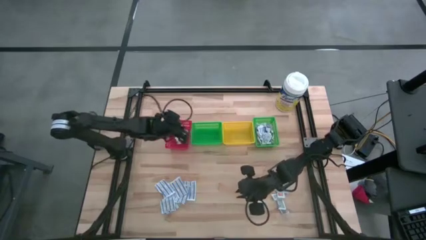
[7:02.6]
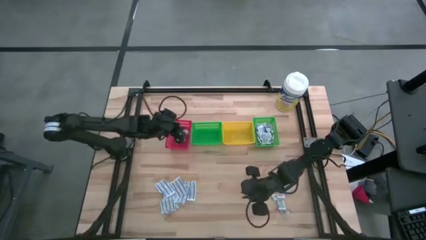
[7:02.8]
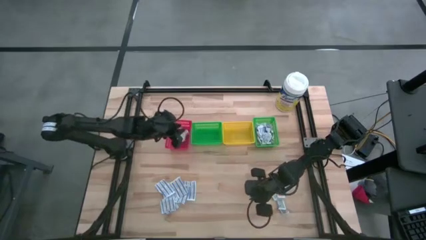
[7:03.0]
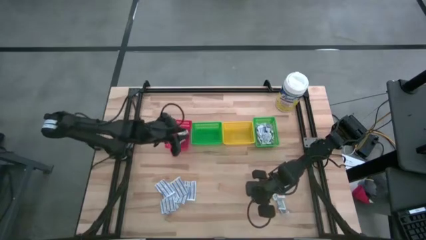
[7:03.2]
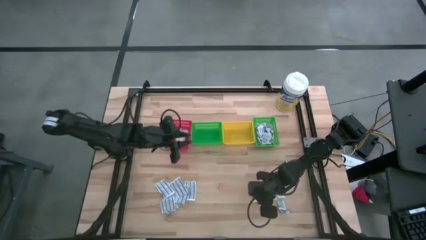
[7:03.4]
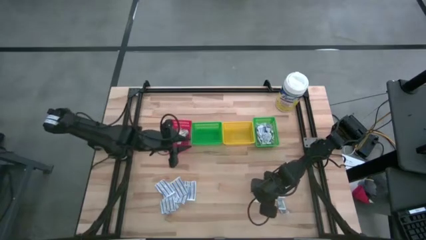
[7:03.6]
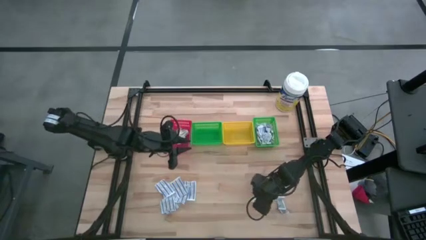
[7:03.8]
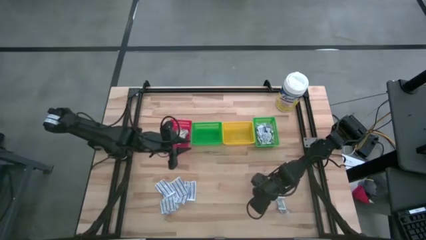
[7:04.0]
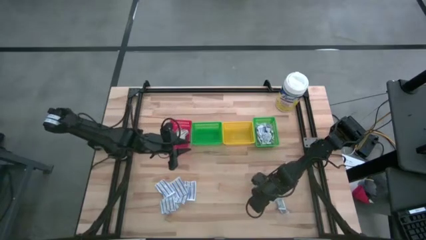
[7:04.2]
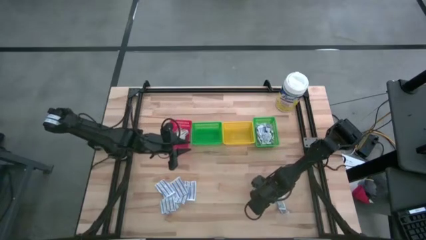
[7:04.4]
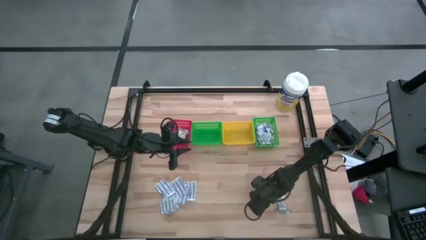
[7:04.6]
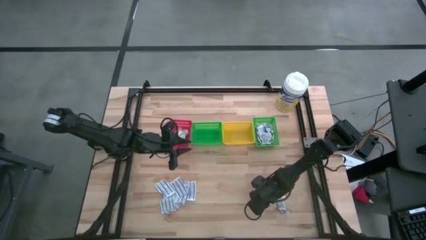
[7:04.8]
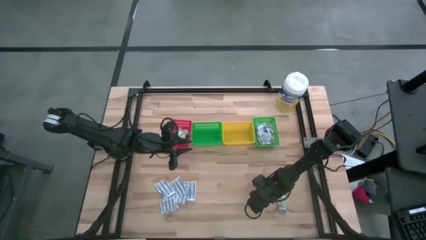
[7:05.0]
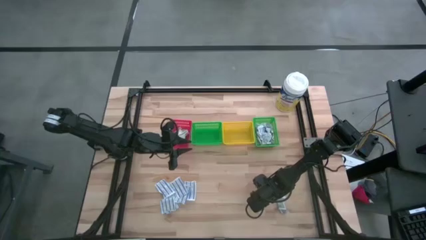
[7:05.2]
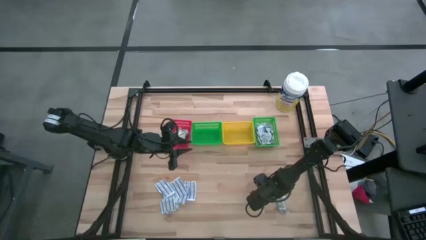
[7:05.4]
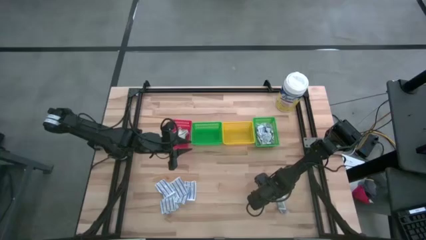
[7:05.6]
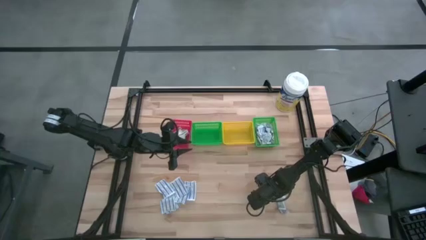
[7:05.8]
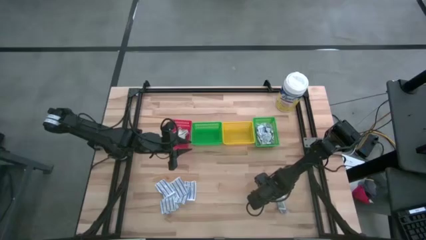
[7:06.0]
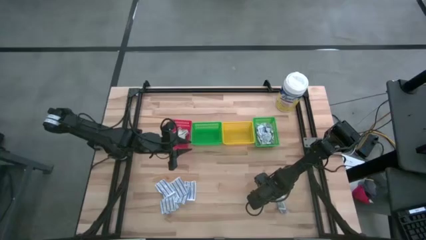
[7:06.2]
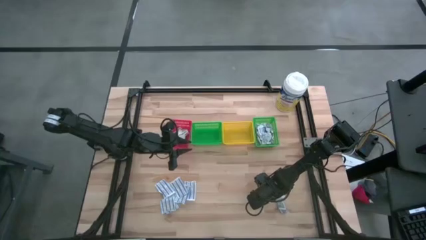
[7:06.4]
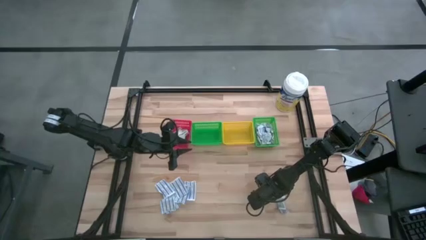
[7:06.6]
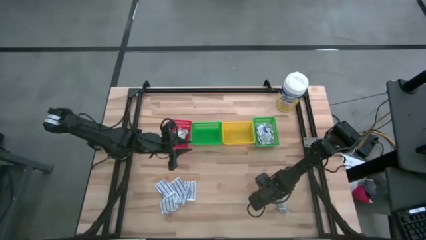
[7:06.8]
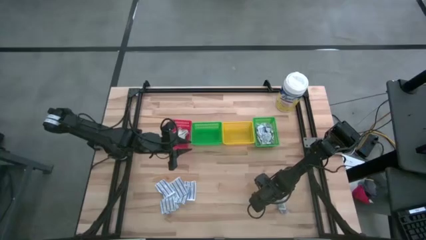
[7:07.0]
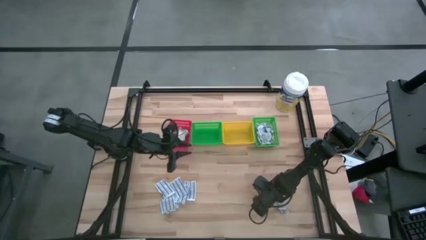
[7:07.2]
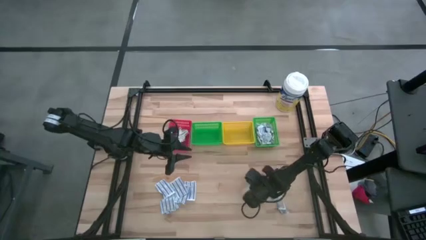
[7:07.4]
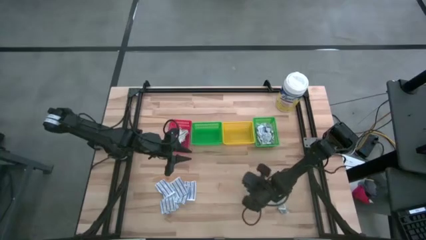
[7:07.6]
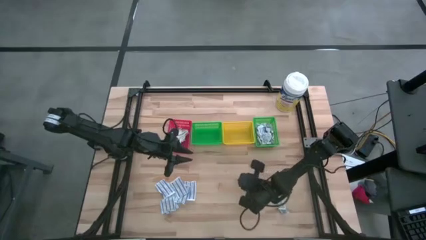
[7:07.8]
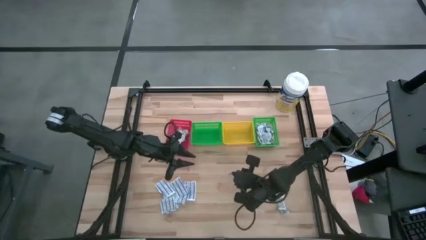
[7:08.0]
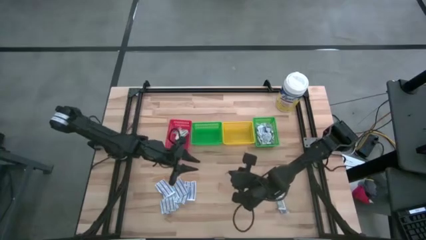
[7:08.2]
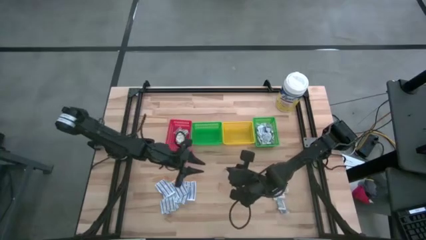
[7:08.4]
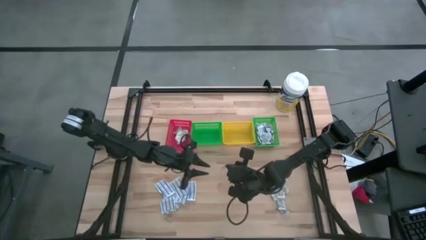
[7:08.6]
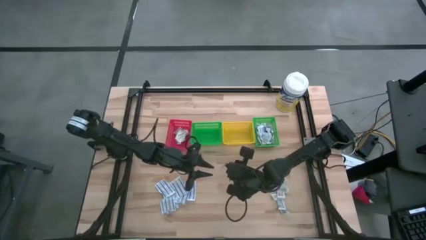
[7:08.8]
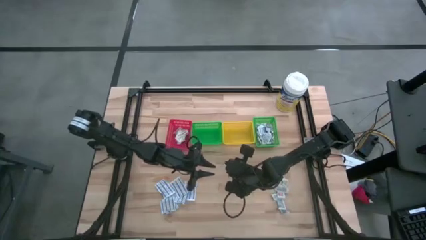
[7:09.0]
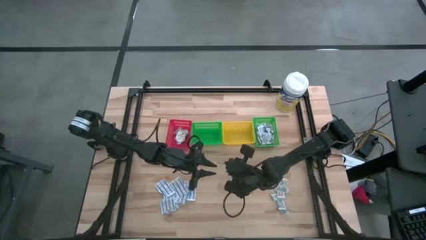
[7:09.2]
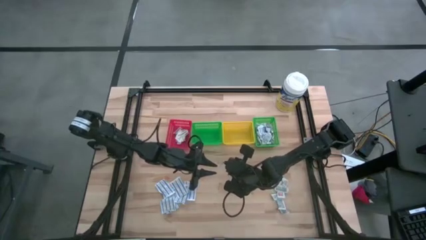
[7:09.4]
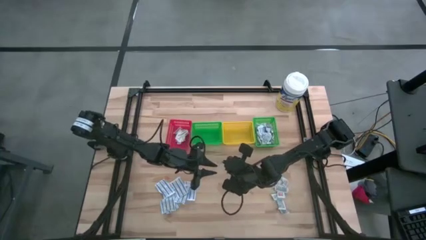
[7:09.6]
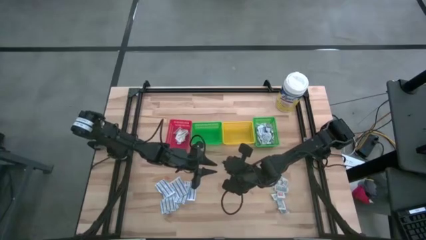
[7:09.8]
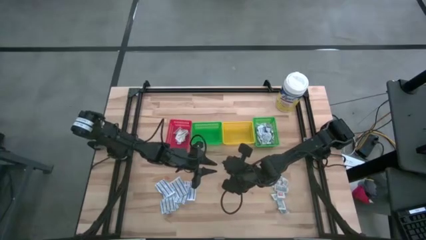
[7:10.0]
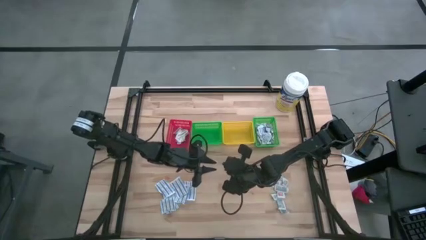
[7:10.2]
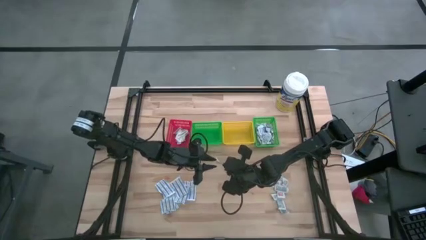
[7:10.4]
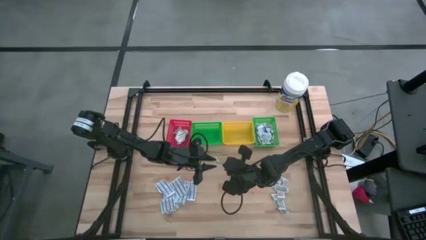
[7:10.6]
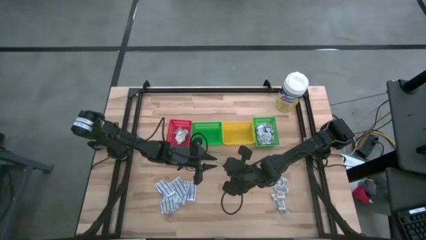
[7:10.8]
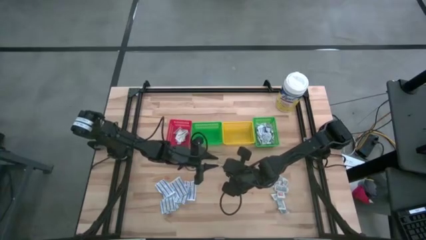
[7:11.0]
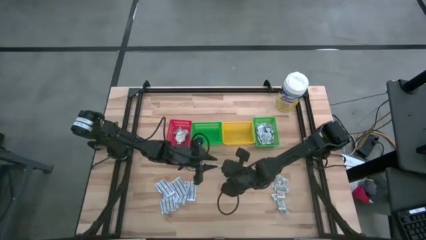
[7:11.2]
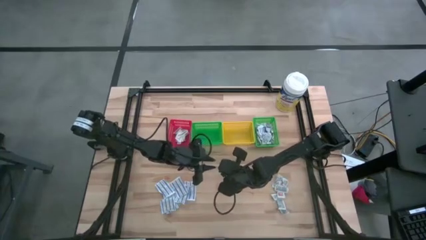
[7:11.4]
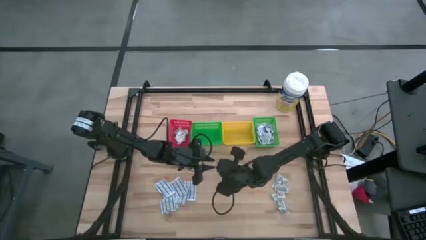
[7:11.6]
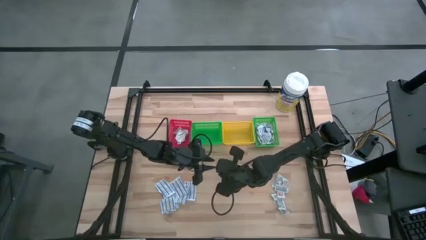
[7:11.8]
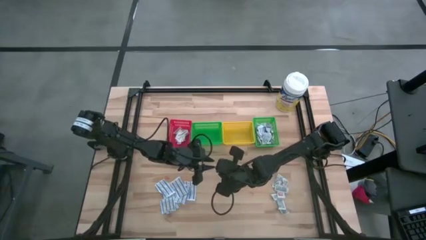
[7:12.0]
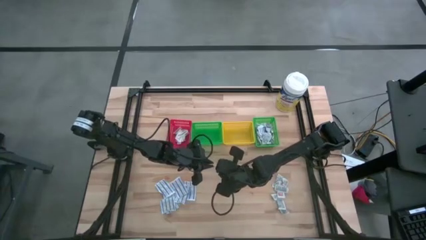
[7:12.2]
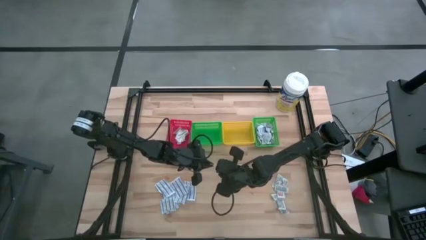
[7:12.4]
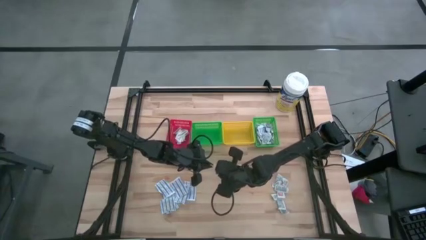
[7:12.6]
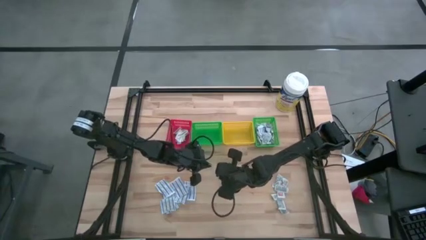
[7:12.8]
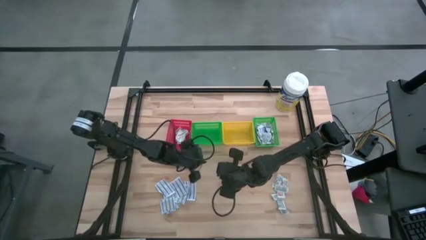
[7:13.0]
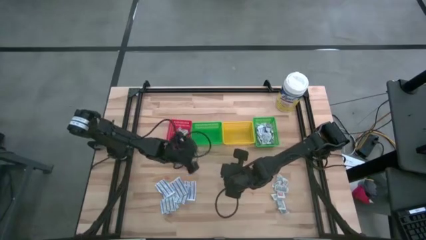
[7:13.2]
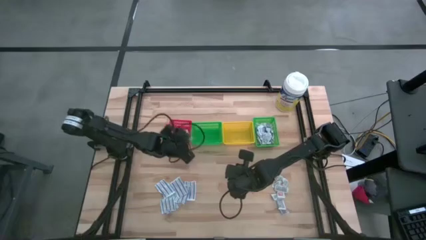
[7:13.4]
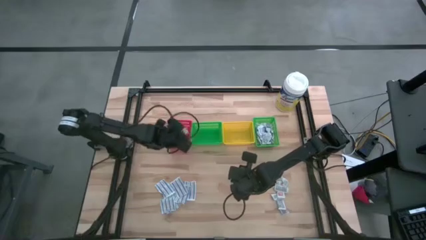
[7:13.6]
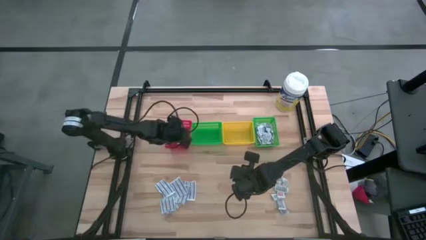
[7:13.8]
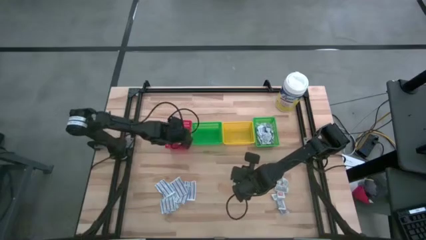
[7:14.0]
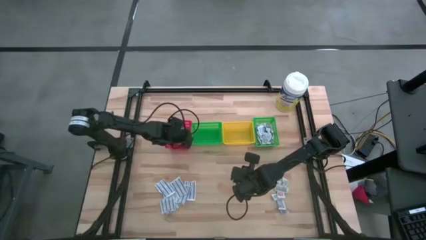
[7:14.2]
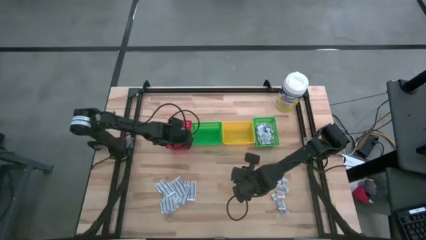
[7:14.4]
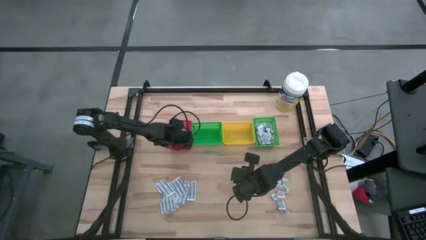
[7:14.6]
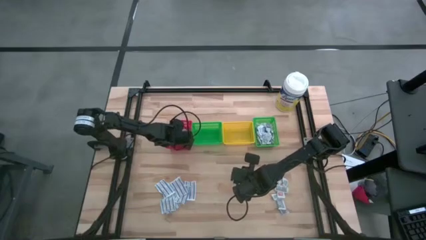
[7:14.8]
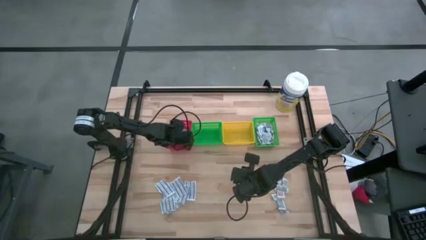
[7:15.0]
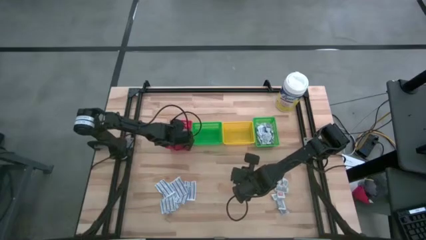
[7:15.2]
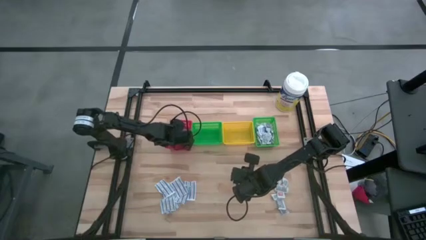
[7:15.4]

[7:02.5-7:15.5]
Task: Pick & Place First Aid Supplies
Put the green bandage into the red bin
